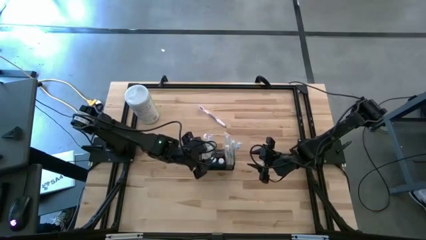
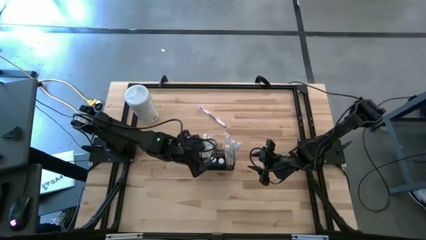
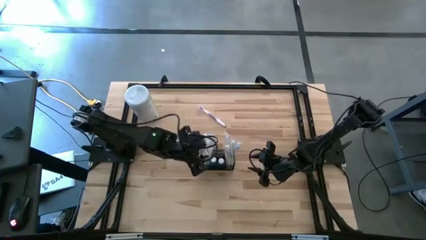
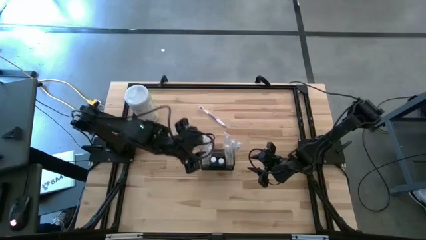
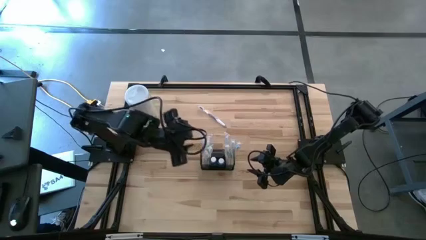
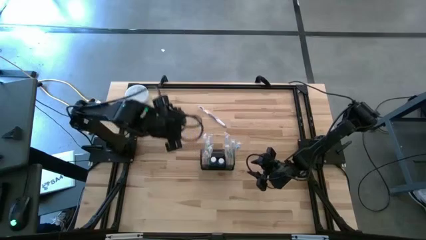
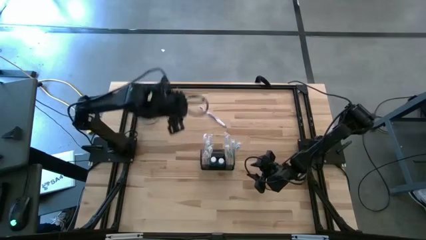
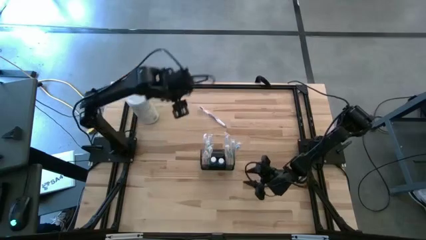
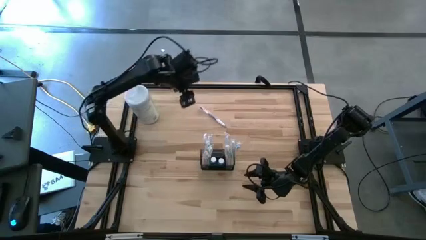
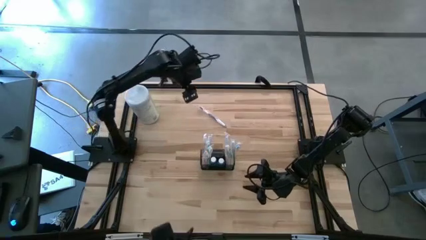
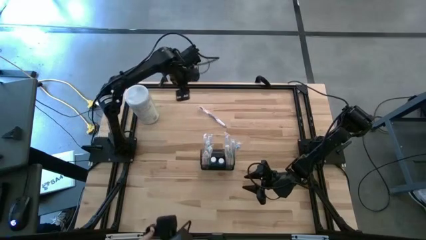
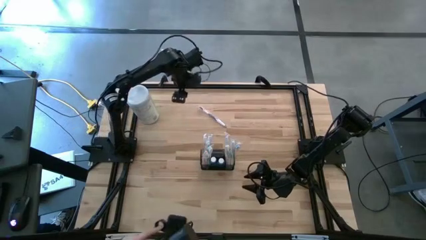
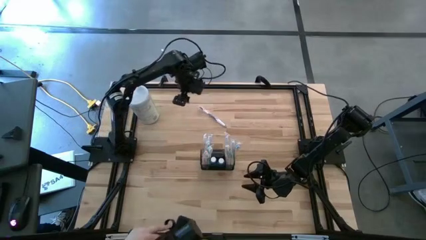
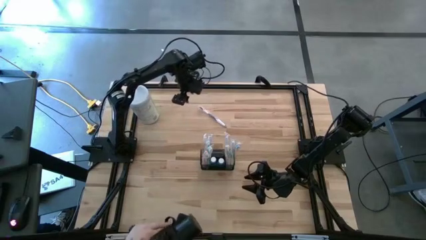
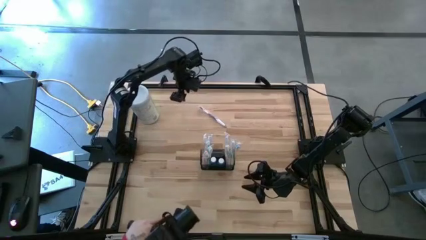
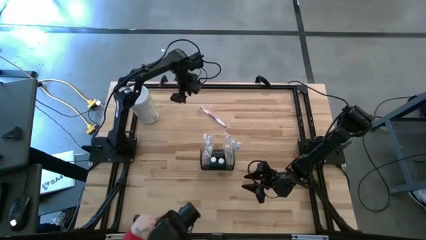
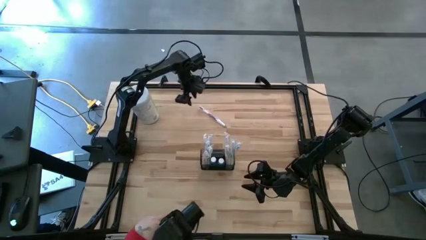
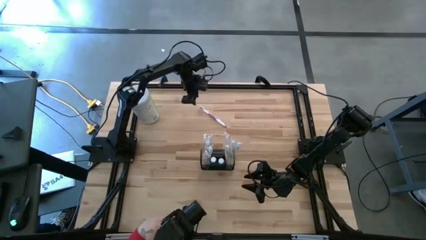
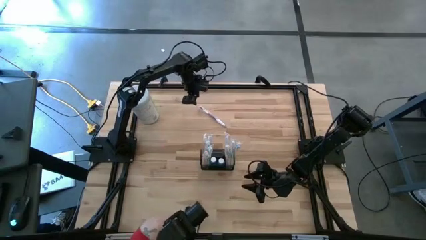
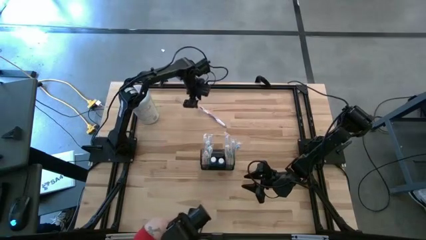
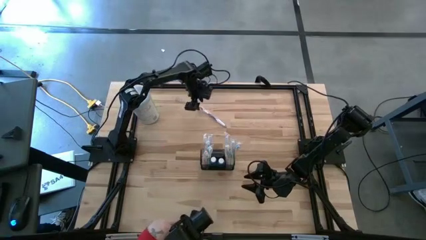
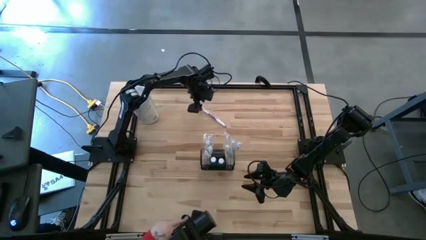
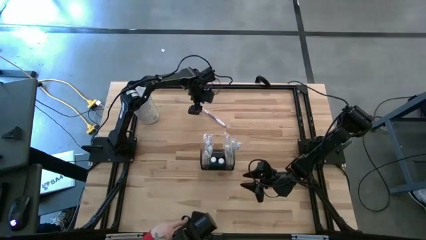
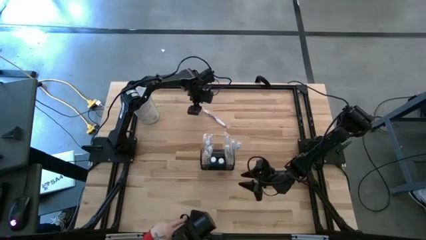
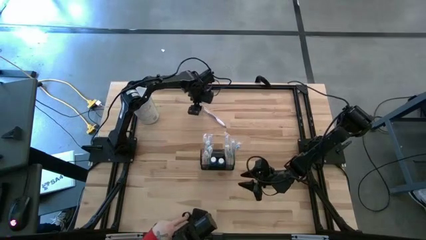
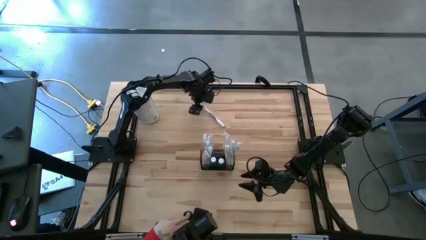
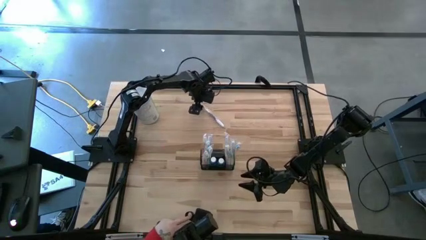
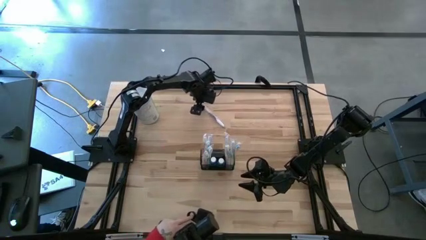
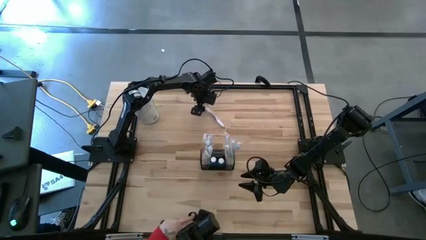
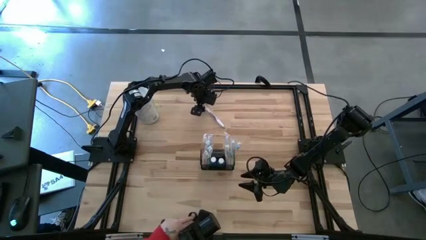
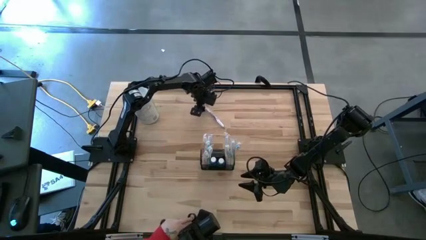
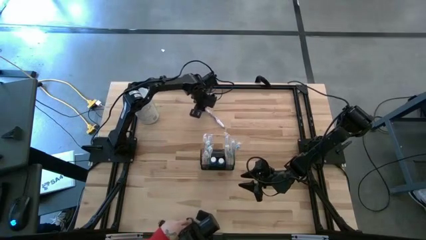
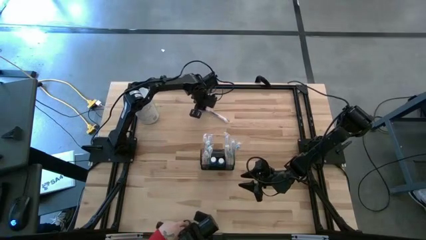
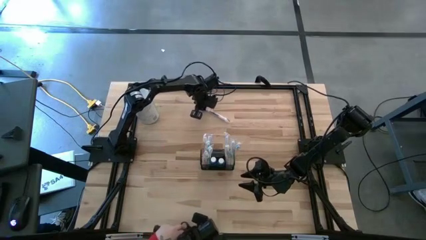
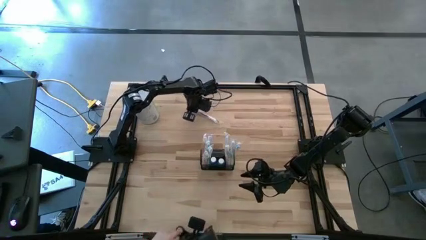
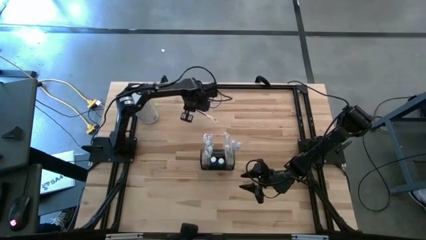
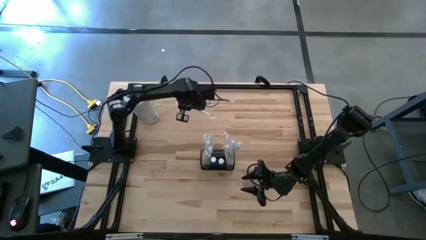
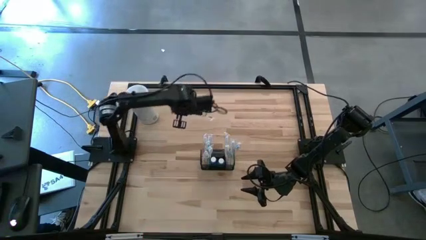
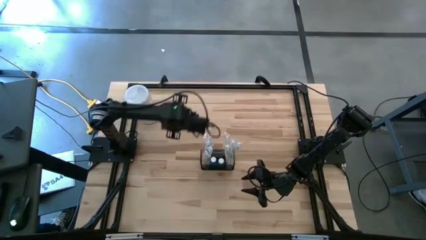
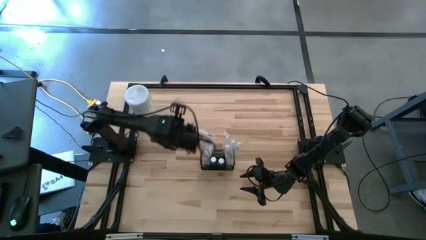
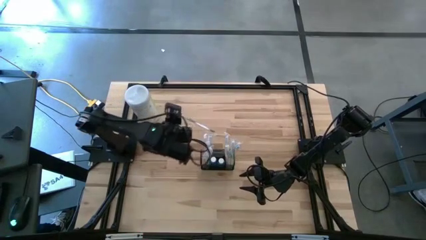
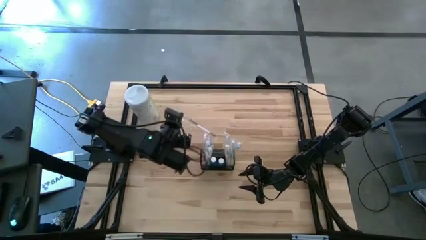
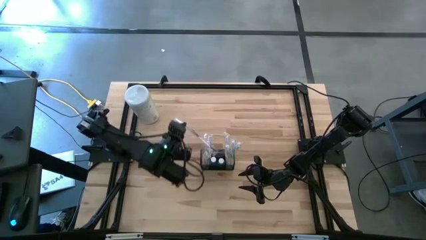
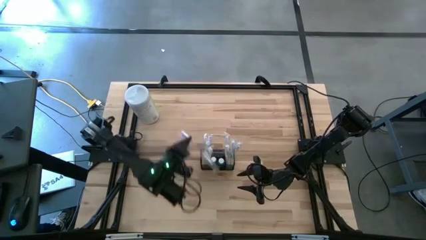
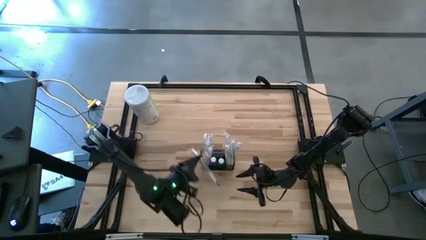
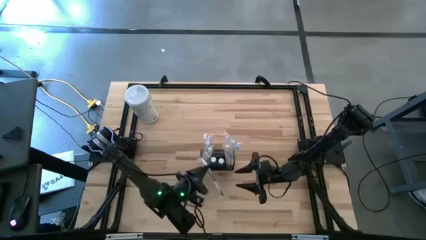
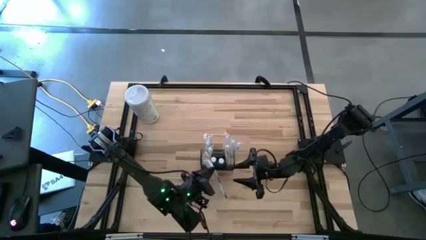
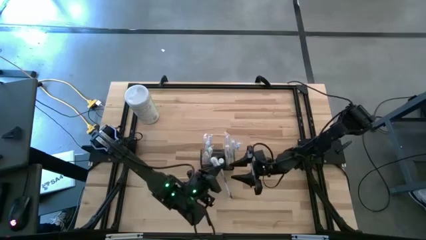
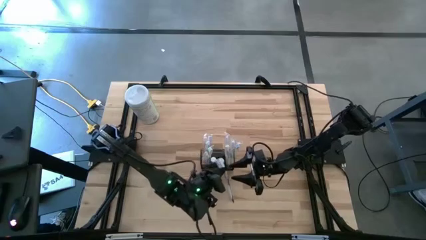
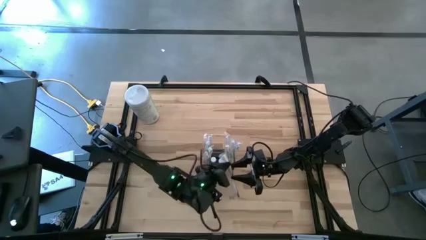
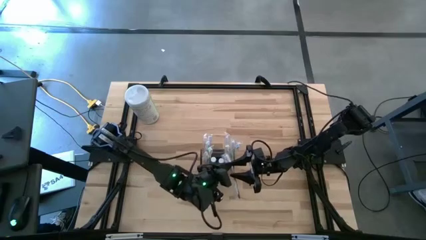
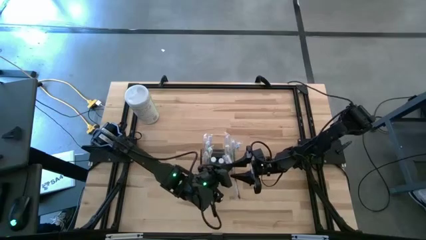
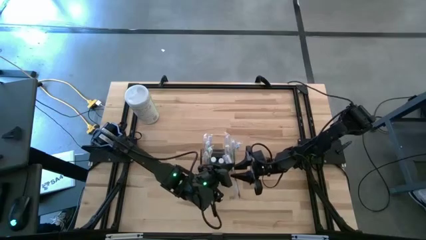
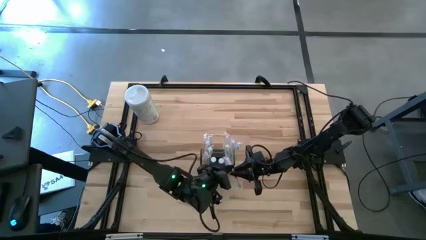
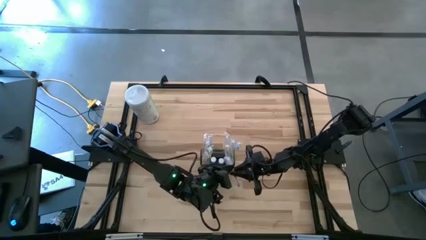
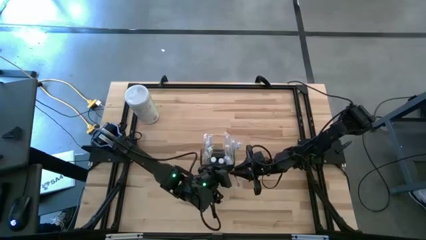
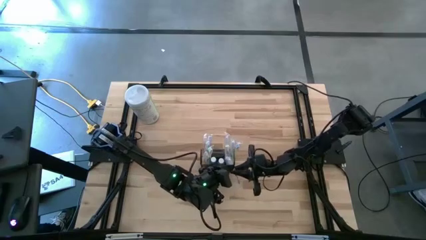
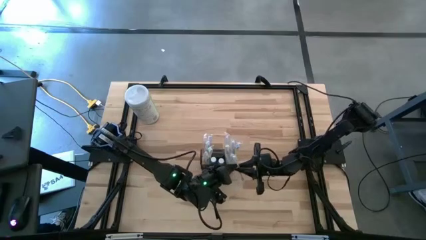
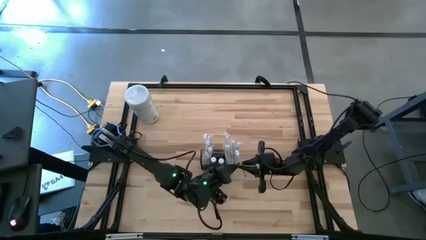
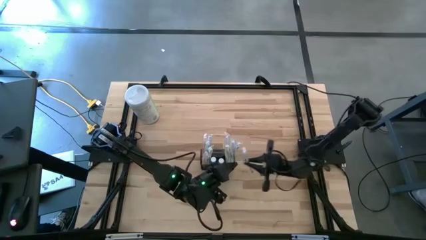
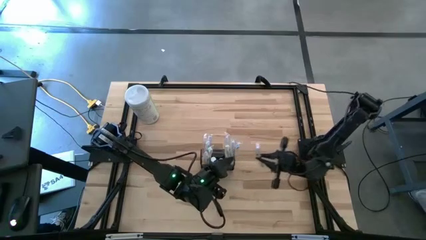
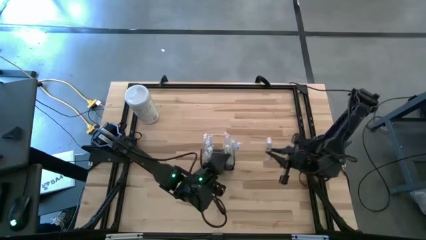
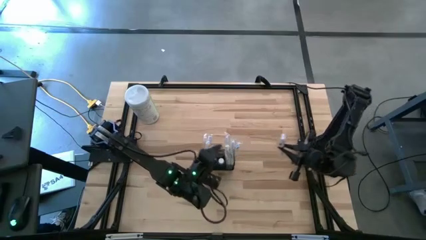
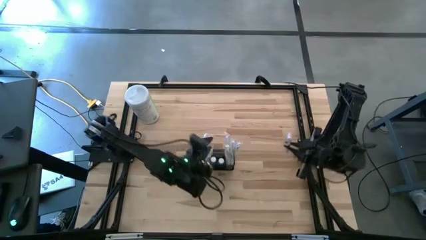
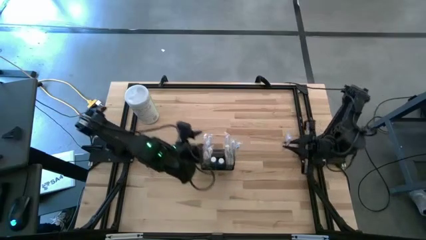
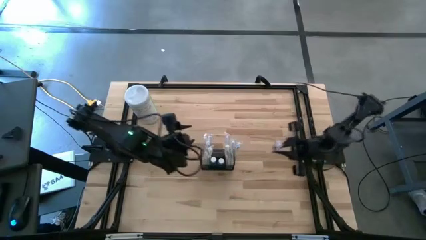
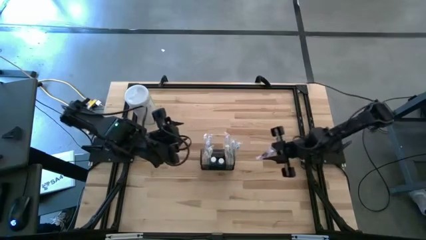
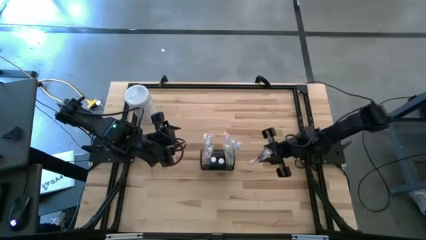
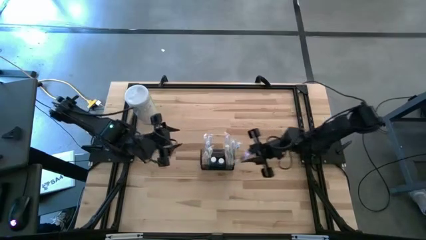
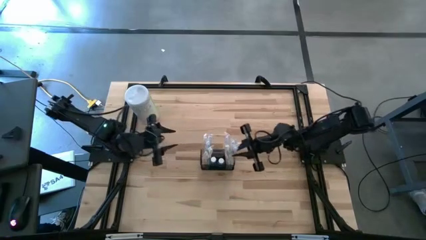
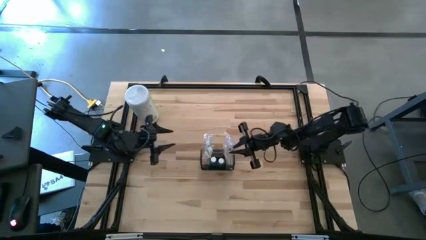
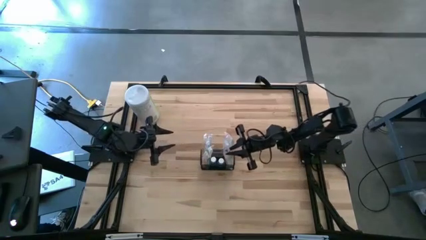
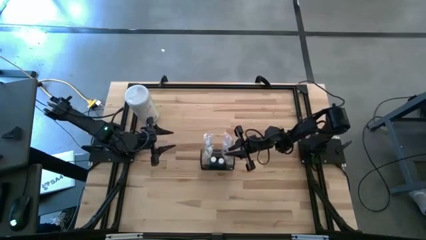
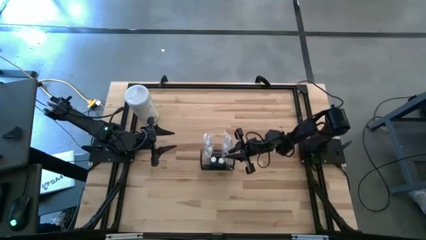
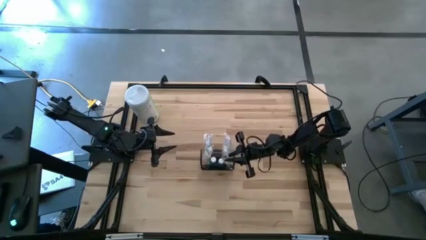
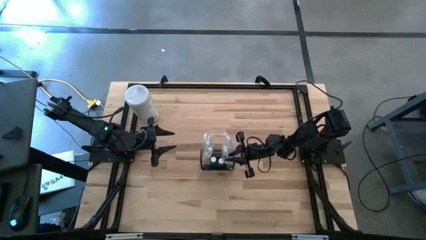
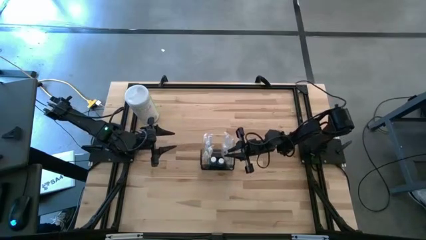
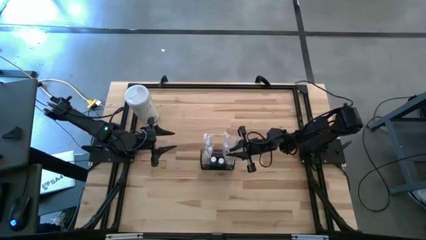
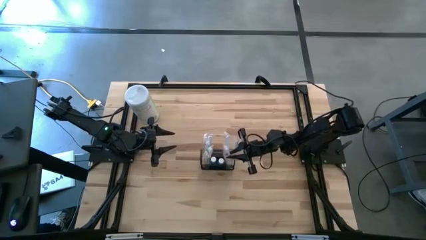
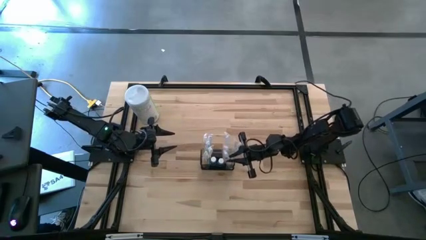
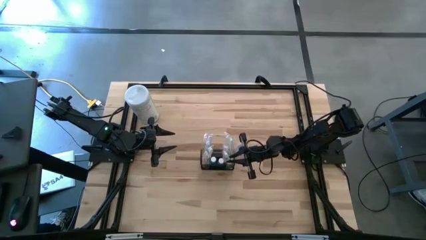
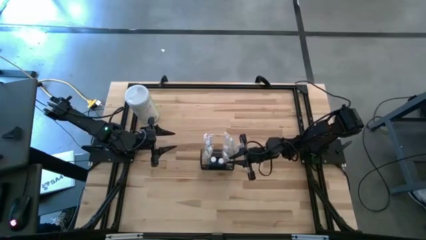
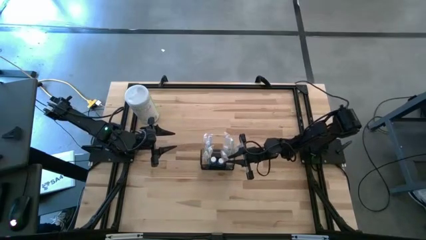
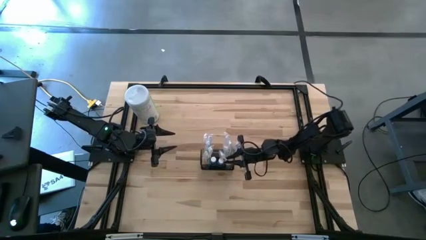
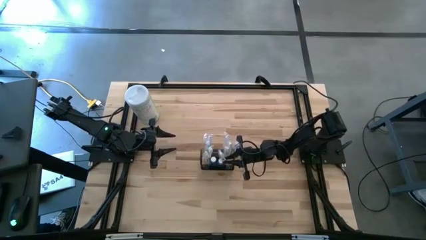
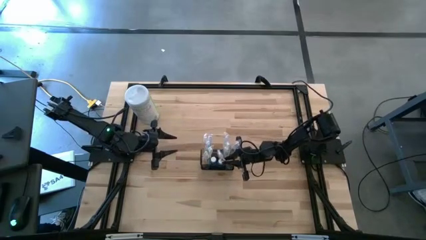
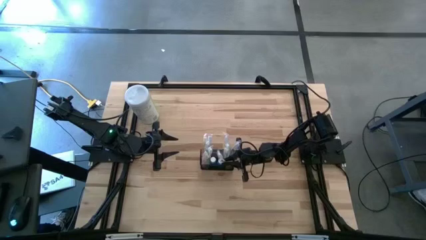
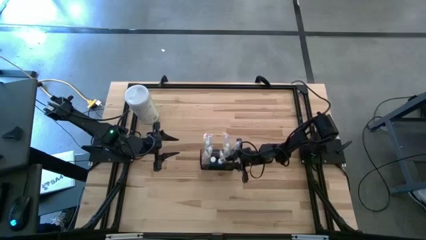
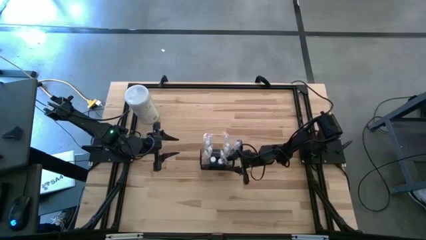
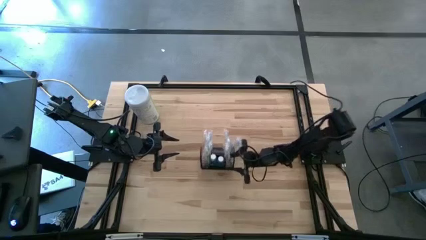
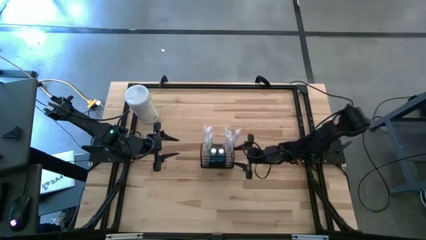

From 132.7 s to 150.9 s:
Task: Pick & Place toothbrushing station
Put the violet toothbrush into the black wire organizer
